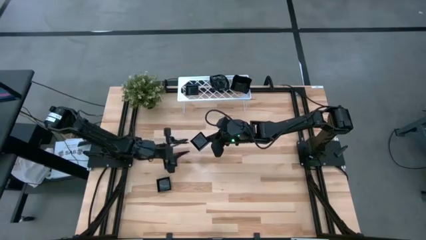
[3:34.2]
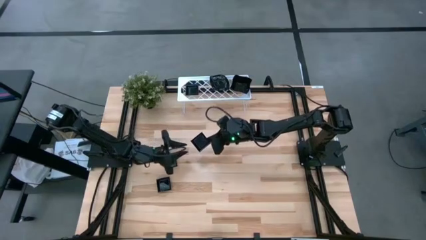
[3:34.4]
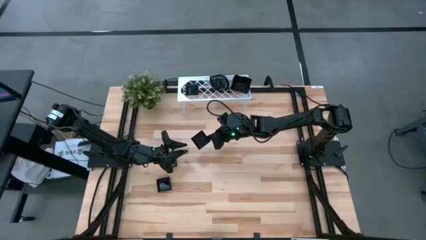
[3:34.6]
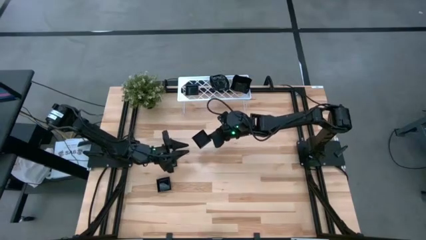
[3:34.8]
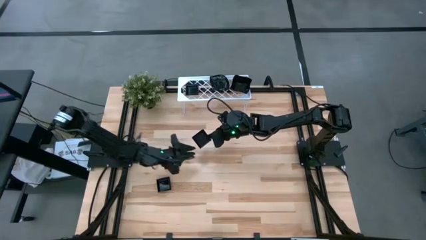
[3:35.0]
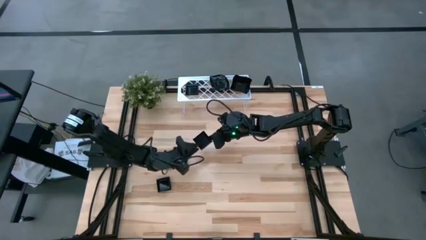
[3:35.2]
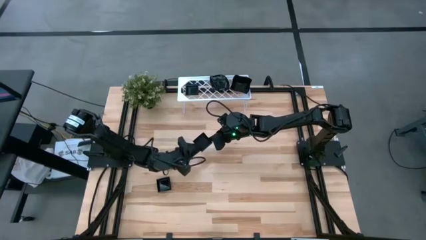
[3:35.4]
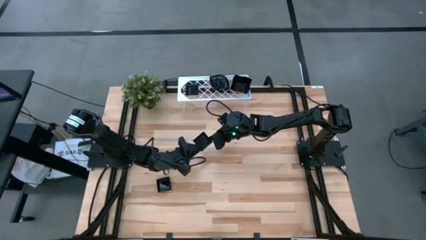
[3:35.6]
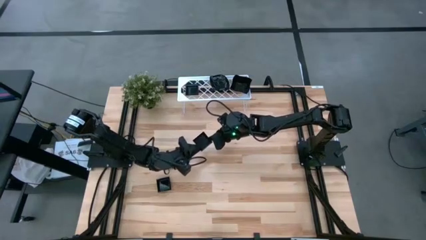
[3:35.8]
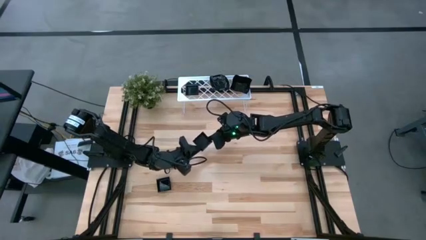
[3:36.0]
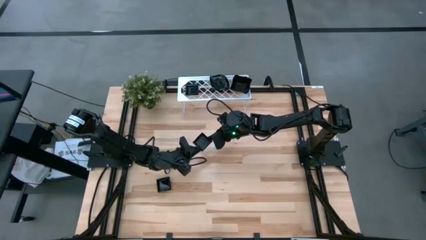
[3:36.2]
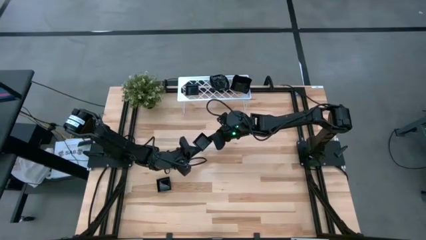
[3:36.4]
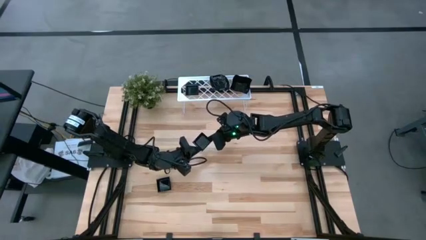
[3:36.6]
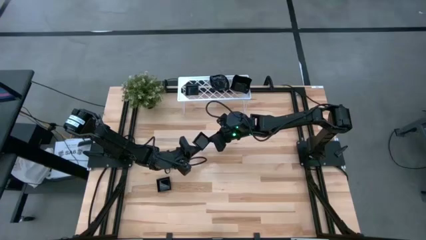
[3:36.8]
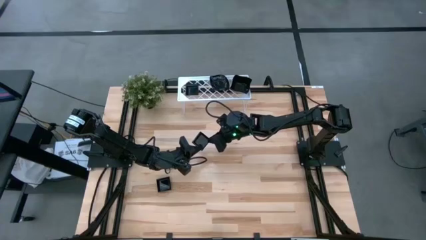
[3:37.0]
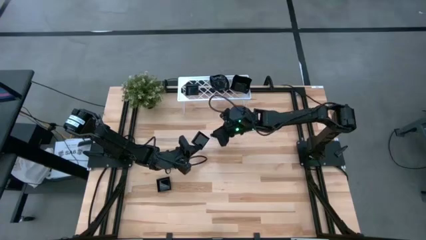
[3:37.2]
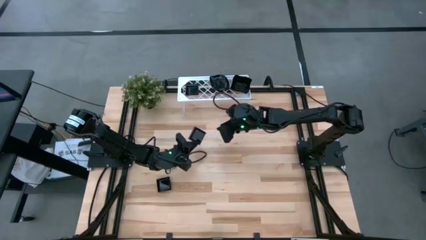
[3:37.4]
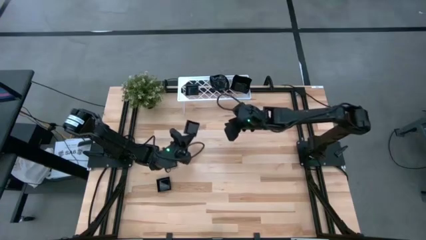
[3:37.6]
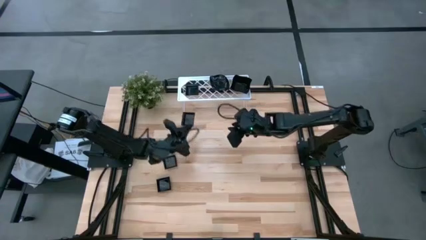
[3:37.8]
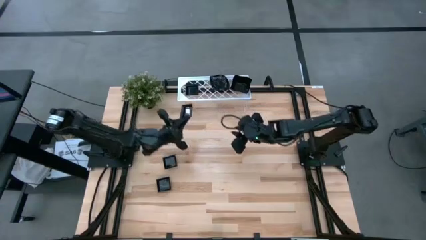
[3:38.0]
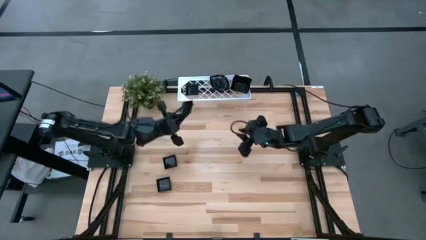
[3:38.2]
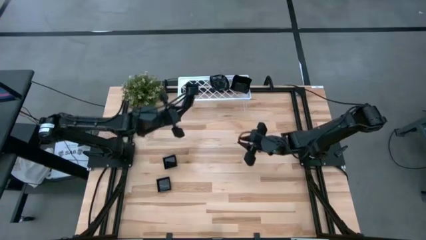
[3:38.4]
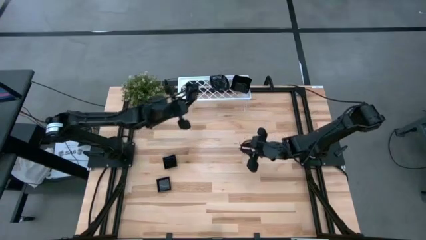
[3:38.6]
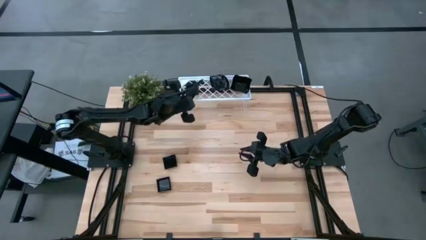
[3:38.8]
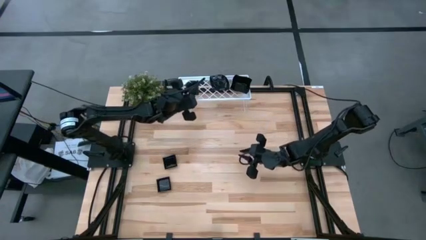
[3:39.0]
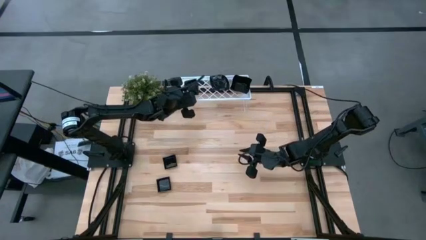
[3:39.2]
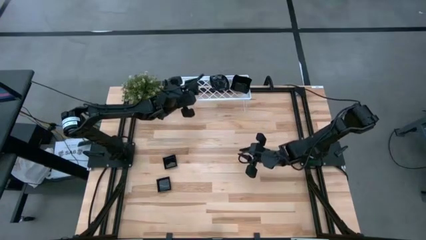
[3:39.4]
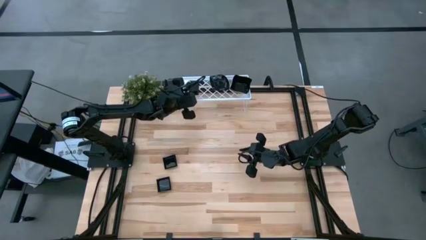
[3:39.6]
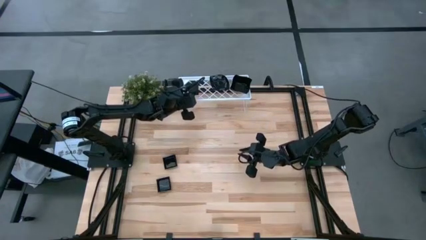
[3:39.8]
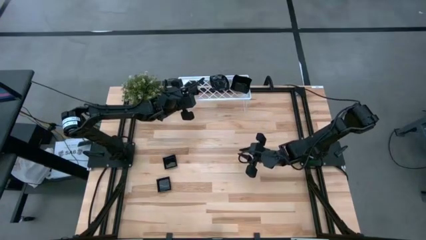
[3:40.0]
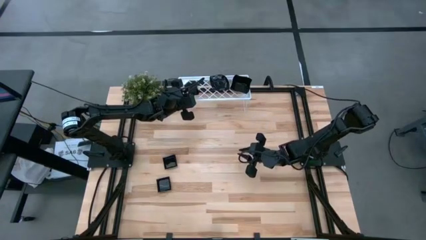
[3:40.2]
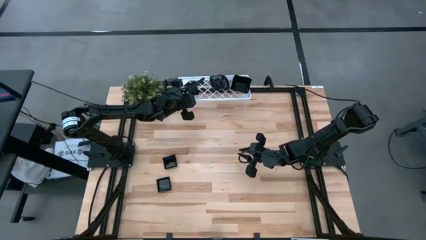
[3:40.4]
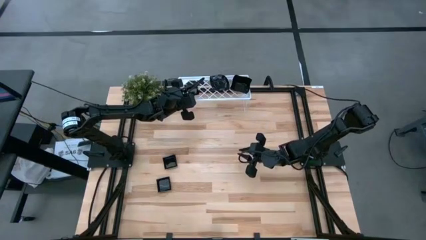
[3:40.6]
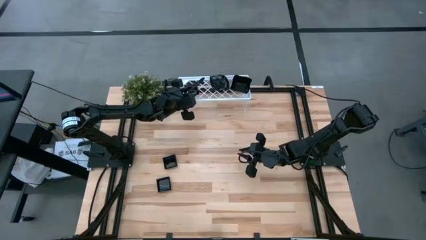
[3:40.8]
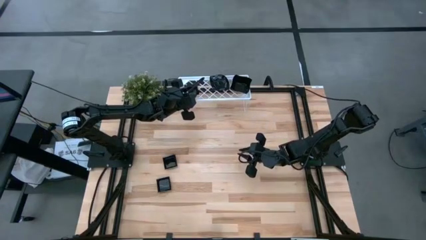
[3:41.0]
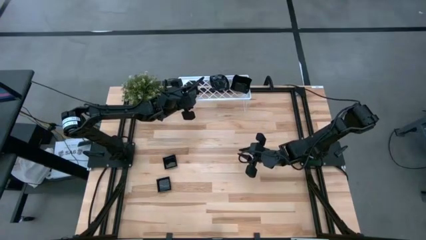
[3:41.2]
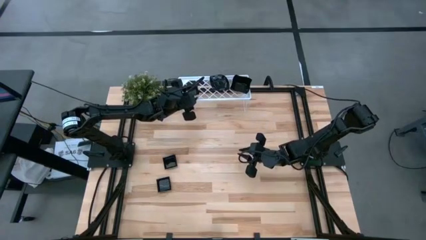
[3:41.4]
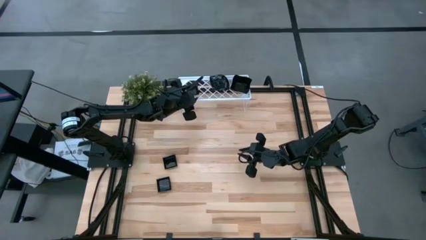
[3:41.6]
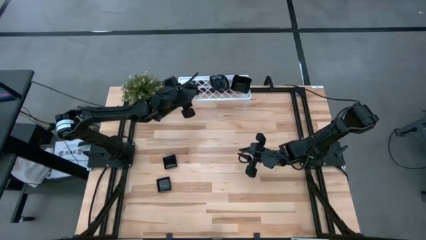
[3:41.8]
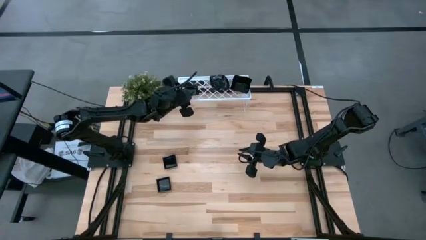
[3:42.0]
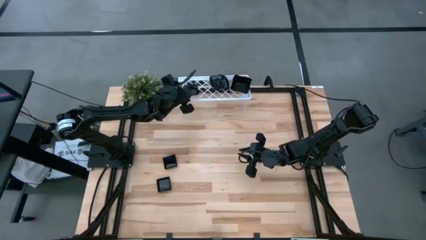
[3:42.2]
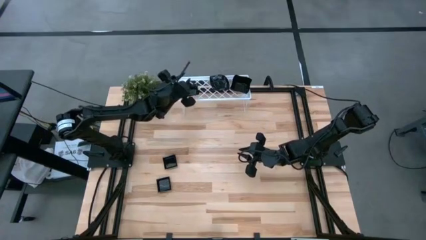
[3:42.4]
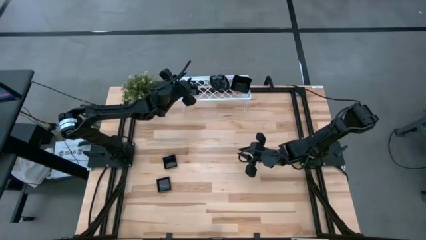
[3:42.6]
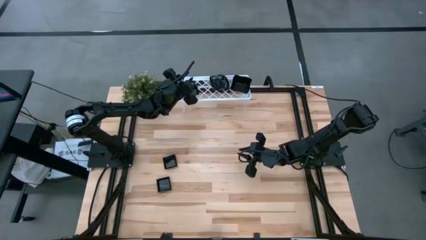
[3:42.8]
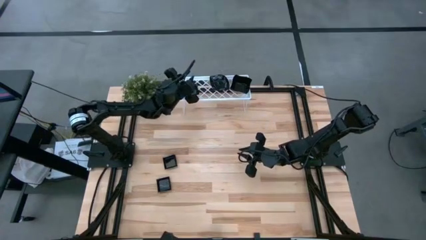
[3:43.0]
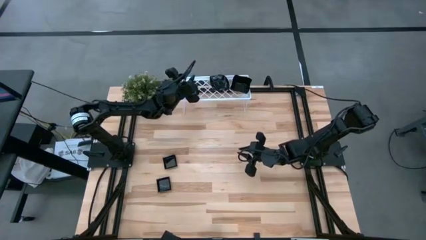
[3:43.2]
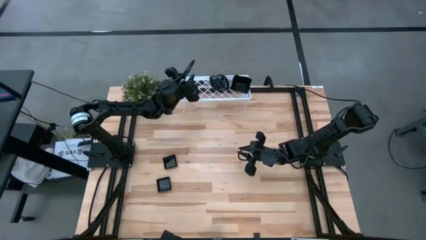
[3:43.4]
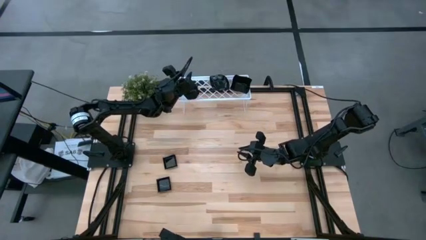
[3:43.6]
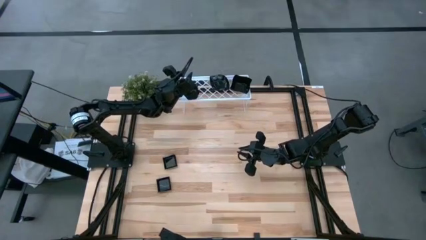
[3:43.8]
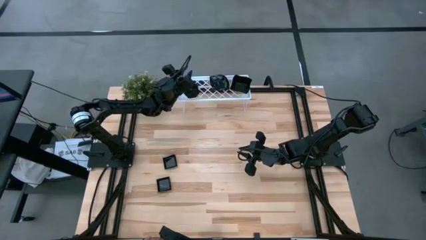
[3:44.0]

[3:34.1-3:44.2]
Task: Pick & Place Mini shaped plates
Stack the black square plate on top of the black square plate on the shelf

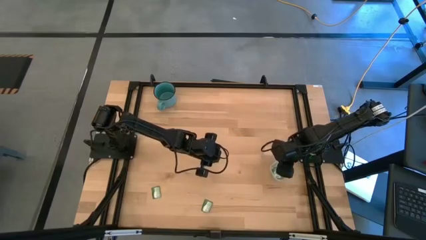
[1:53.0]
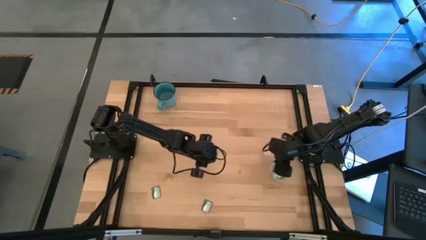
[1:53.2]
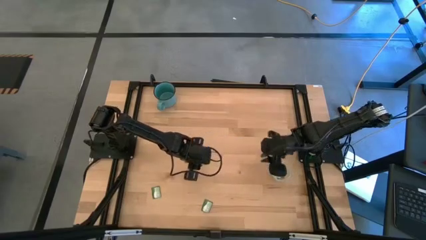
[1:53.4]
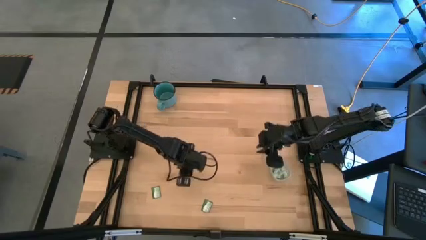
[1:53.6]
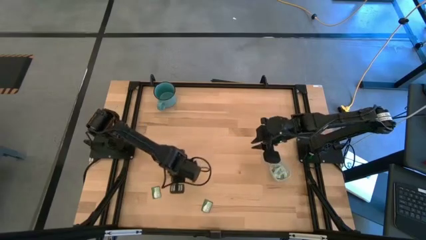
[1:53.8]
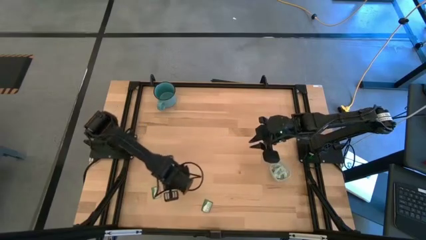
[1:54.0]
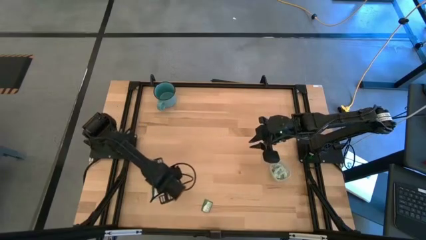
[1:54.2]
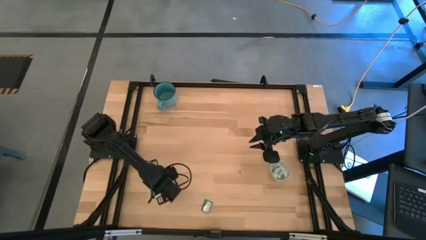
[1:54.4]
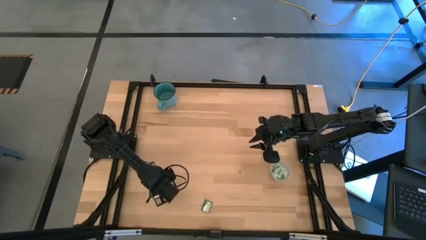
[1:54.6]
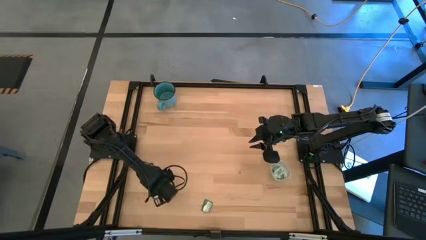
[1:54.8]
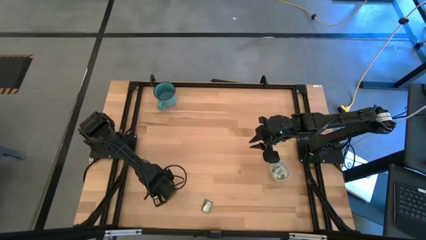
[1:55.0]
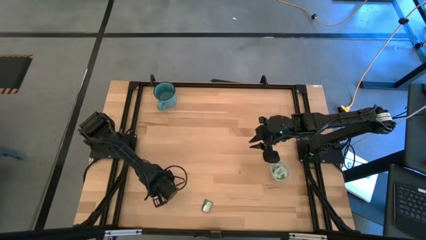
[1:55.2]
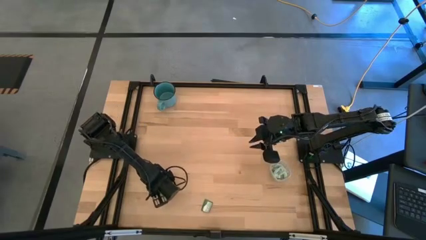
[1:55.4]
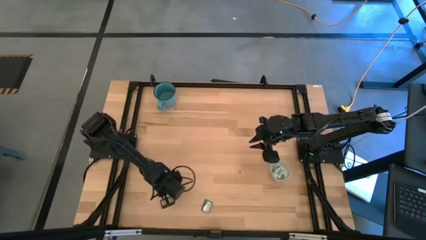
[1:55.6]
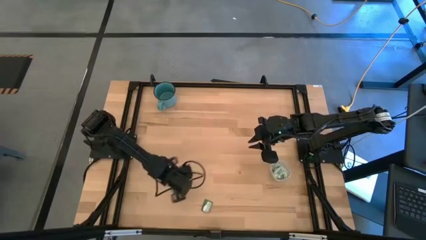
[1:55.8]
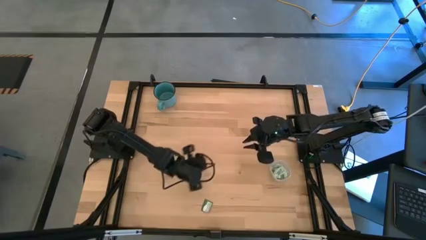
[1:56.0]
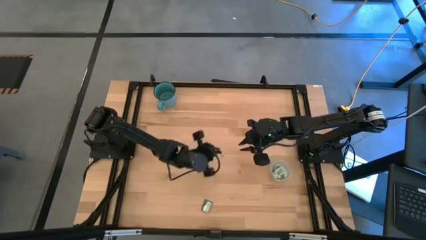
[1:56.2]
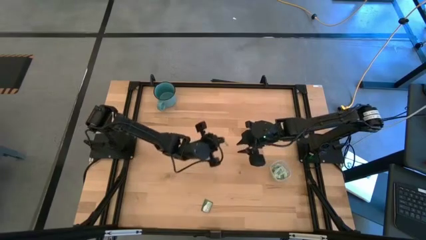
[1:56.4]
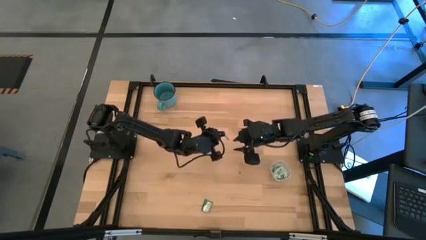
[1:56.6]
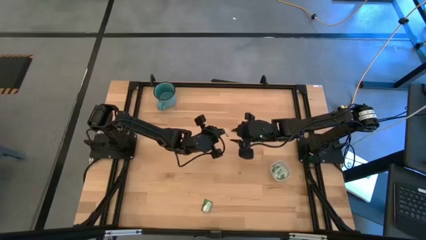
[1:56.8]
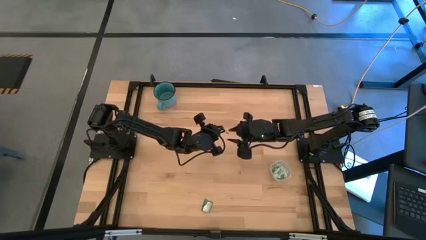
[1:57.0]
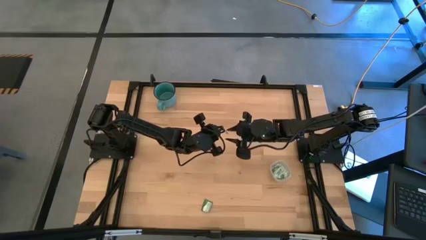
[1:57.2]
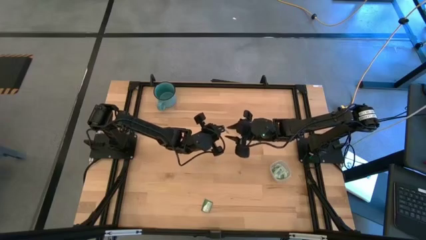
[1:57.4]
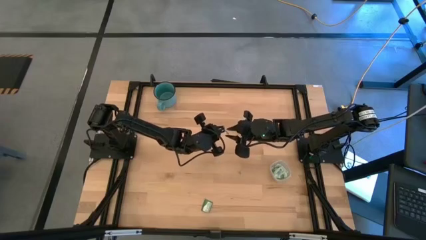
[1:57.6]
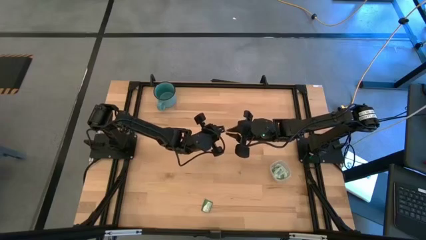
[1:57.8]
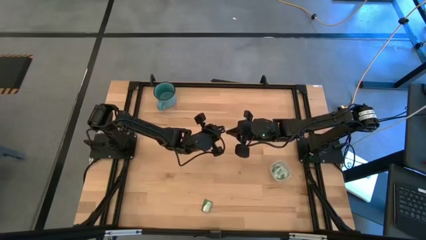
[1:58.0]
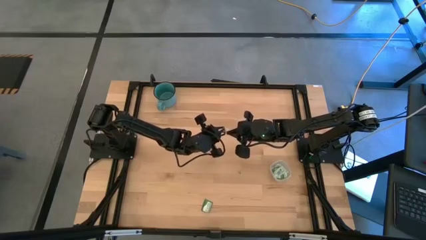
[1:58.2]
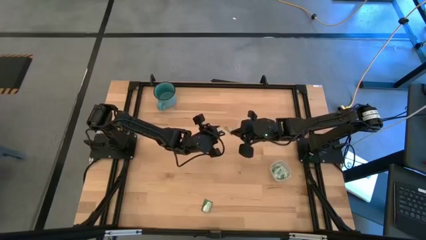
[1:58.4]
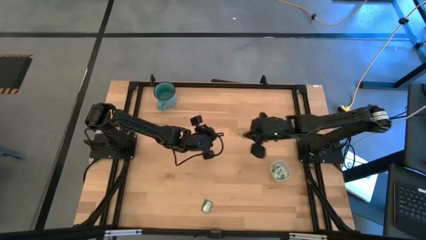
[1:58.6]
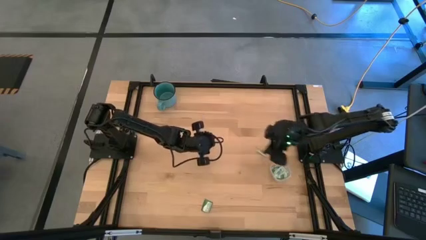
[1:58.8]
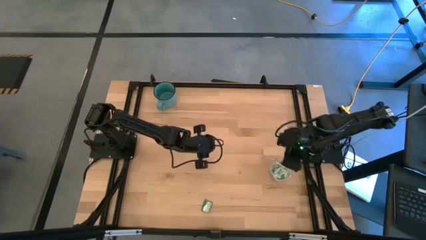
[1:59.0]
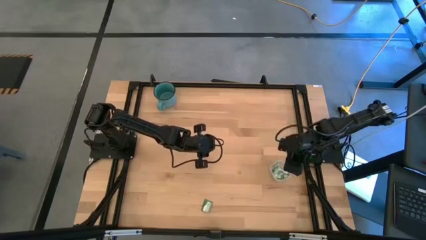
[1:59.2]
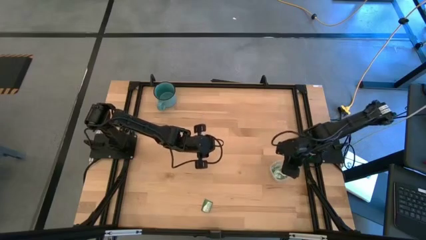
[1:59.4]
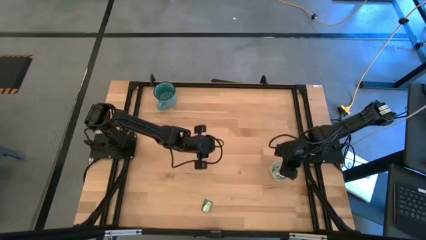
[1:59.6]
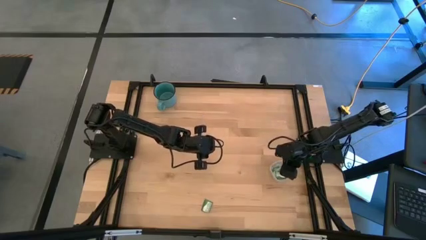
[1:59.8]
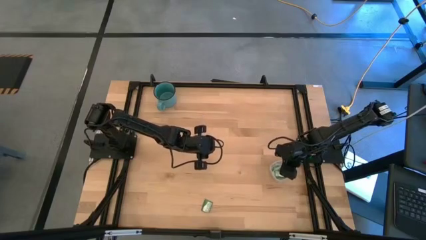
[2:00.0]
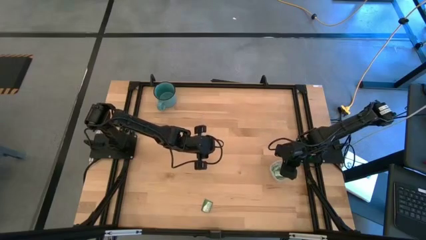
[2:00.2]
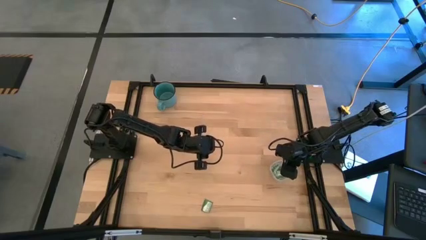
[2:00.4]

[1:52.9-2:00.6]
Task: Pick and place items into bin
Put the green stevia packet into the transparent bin
